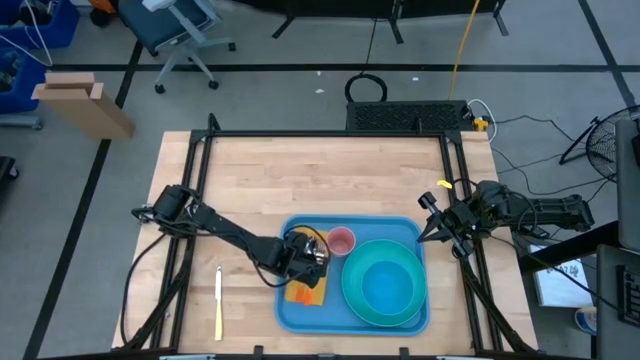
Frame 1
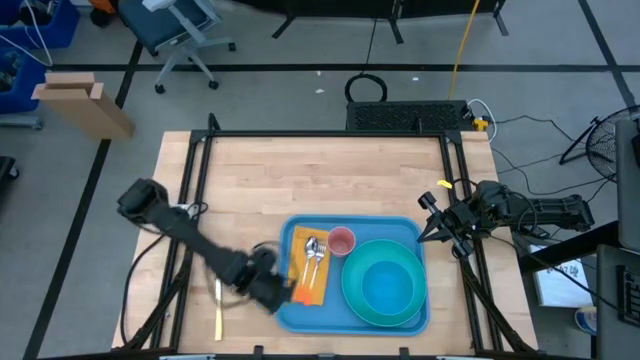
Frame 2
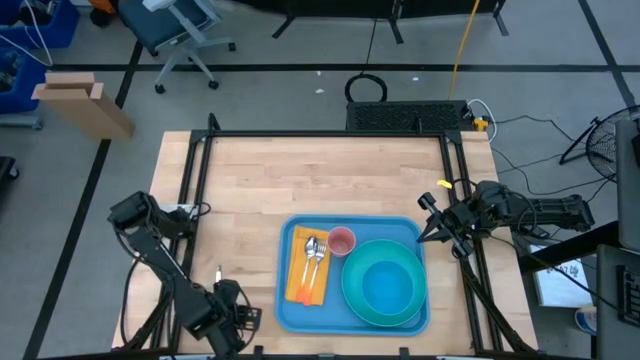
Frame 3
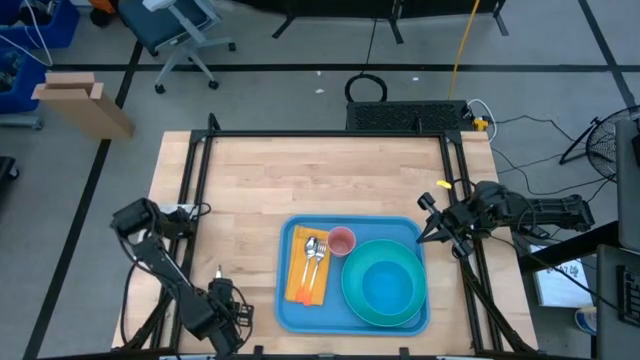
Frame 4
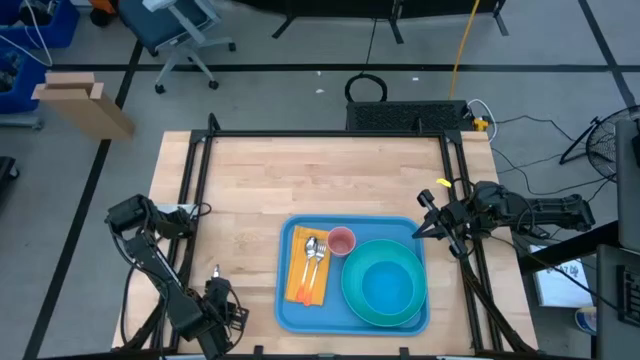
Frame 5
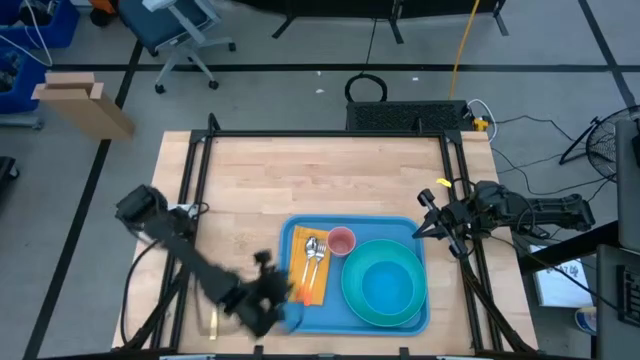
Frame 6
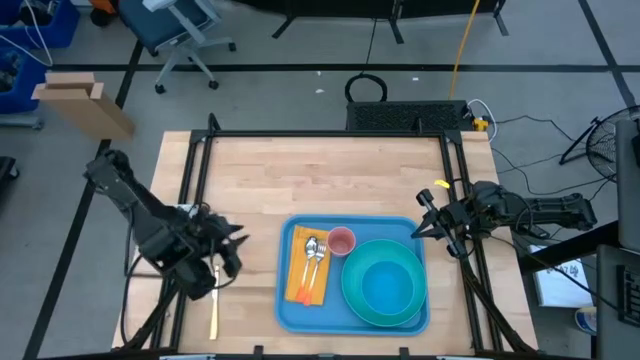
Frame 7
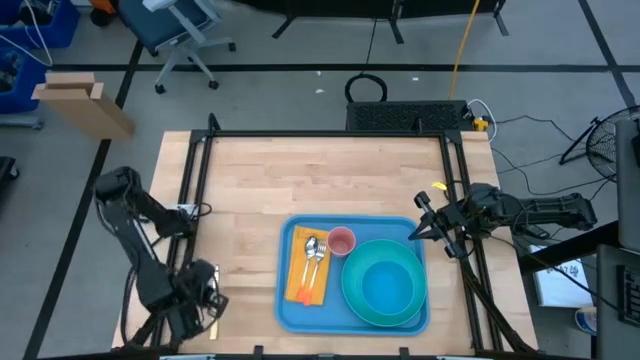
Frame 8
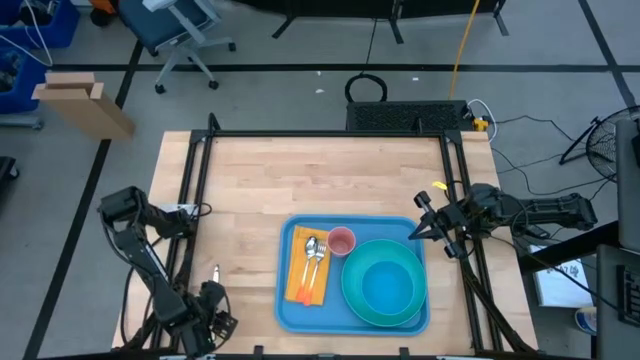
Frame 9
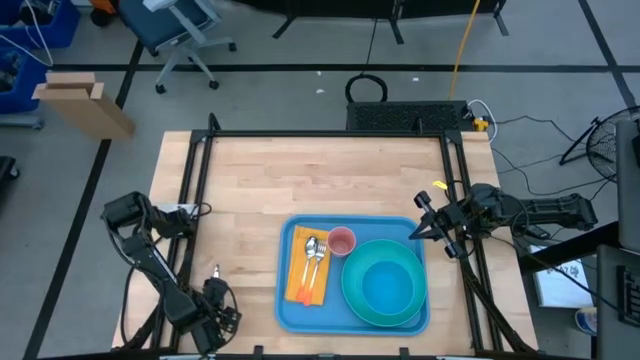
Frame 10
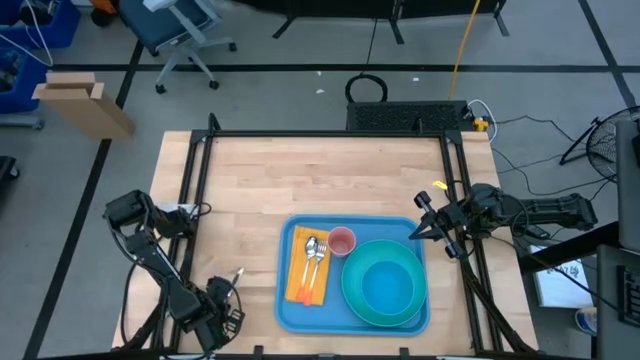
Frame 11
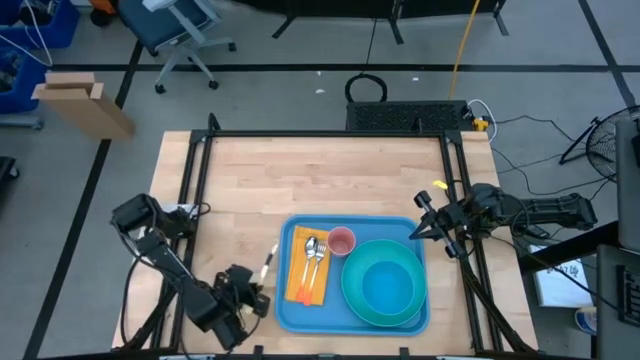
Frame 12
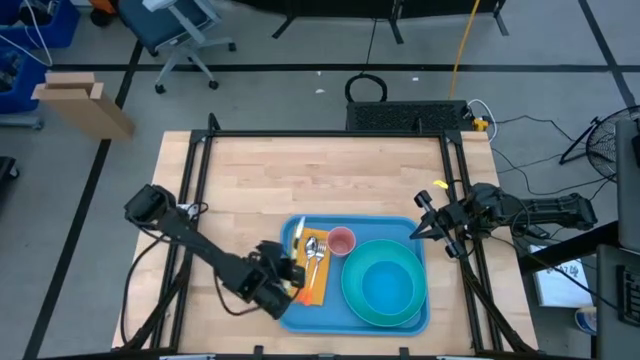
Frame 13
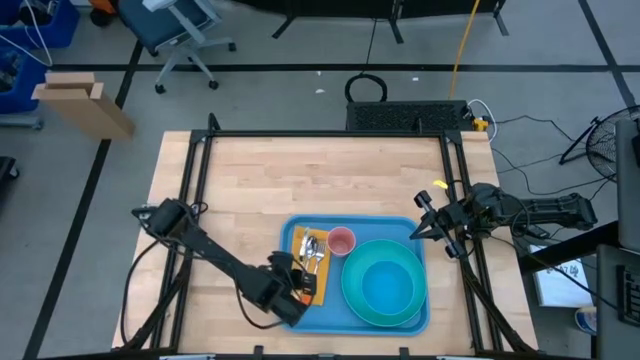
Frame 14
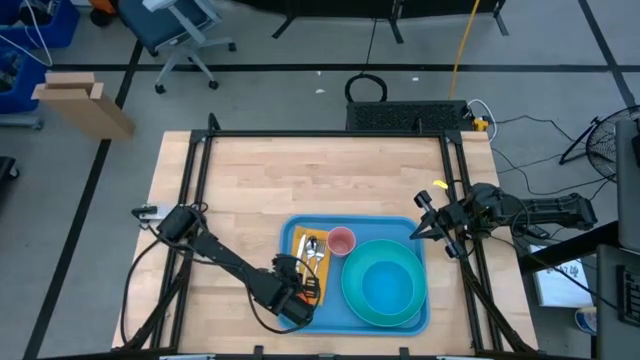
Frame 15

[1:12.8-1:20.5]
Task: Set up tray
Put the yellow knife on the yellow napkin, left of the orange spoon

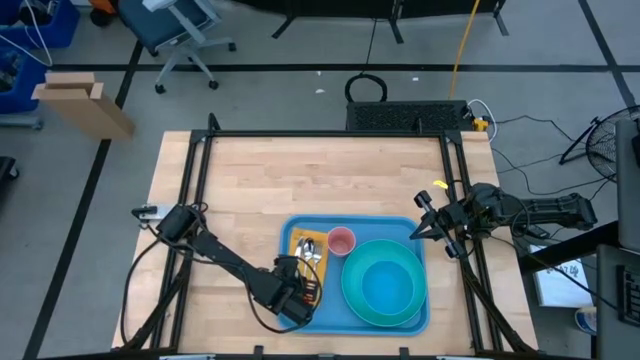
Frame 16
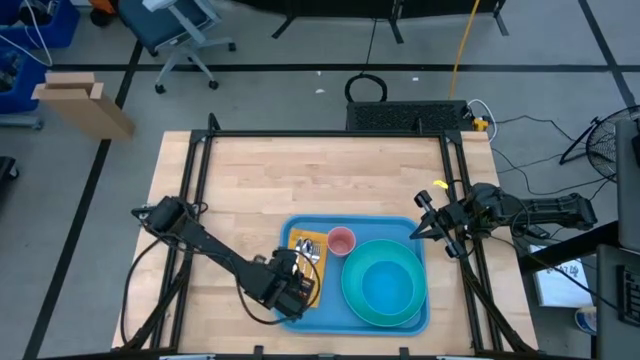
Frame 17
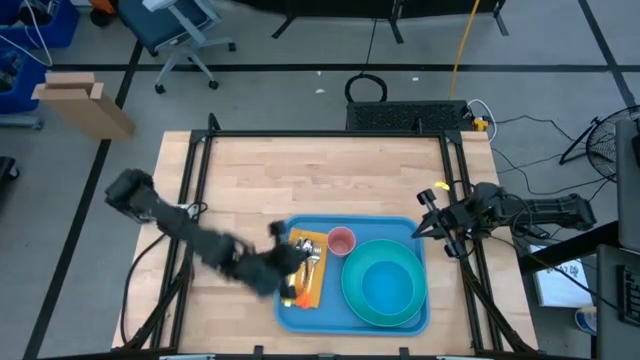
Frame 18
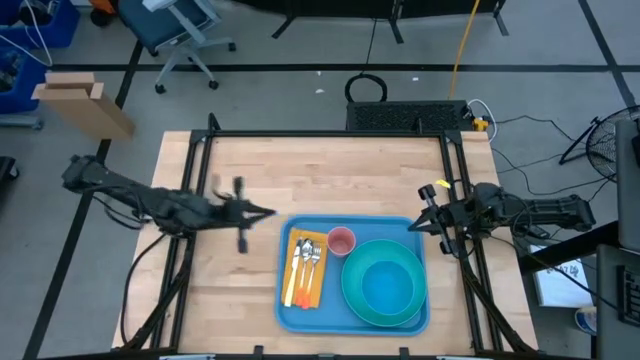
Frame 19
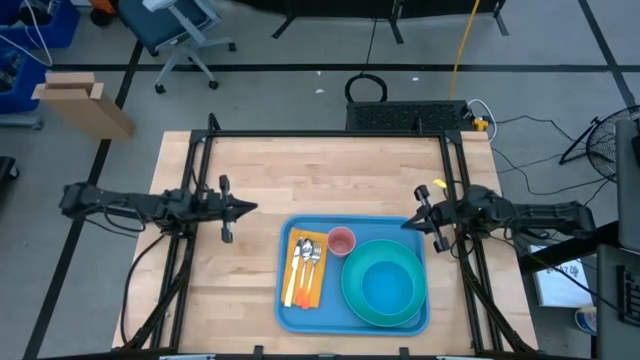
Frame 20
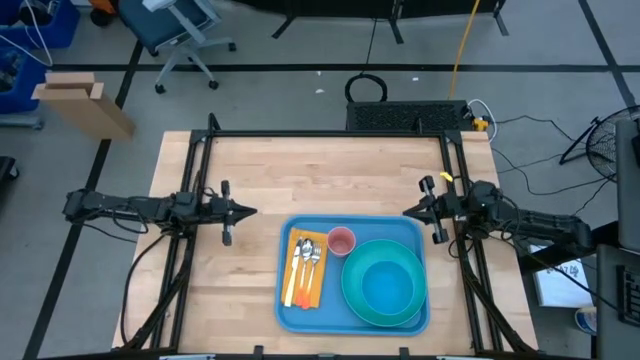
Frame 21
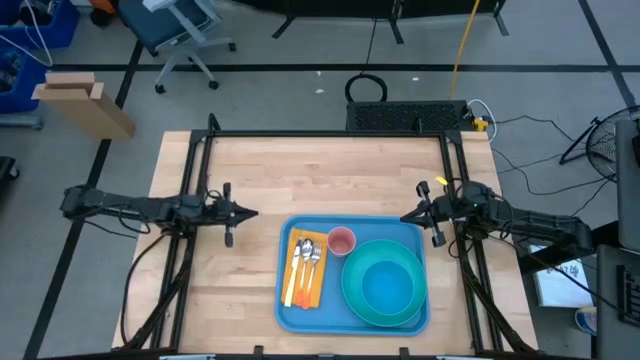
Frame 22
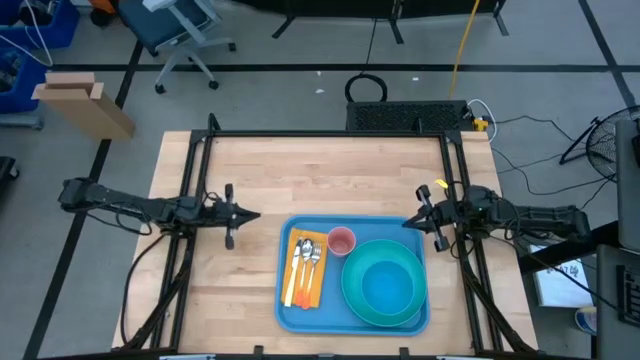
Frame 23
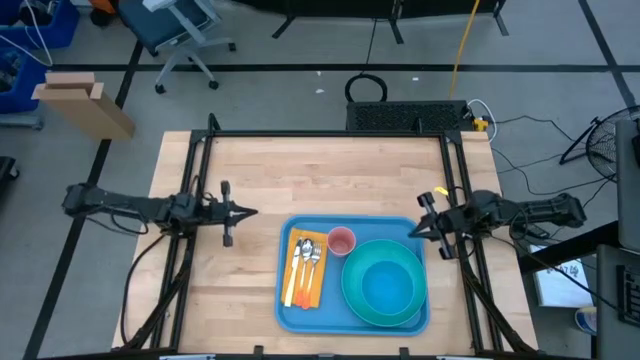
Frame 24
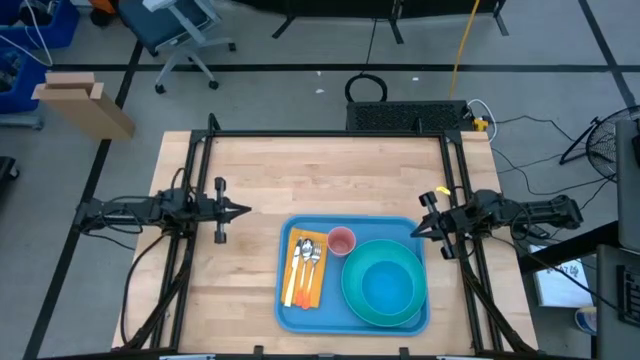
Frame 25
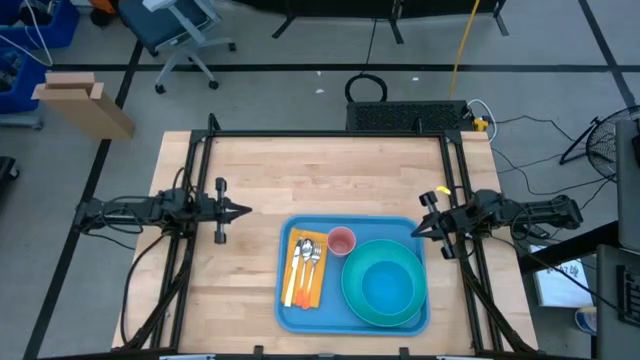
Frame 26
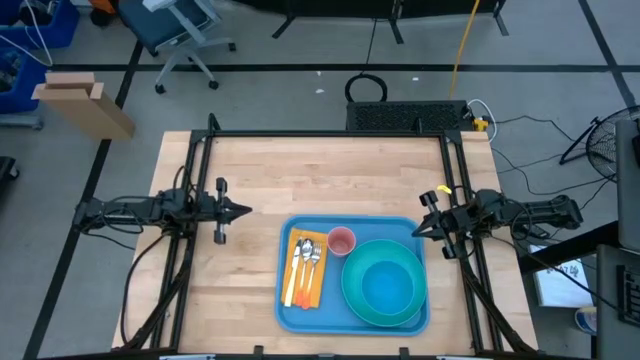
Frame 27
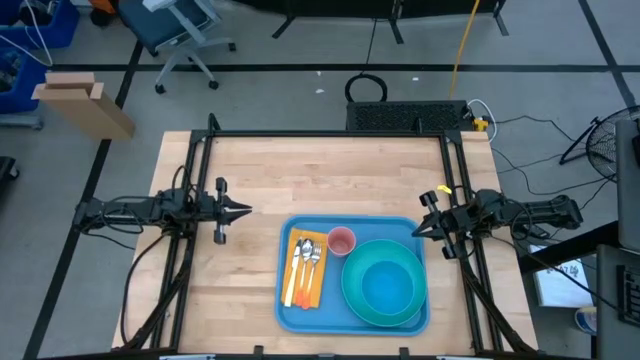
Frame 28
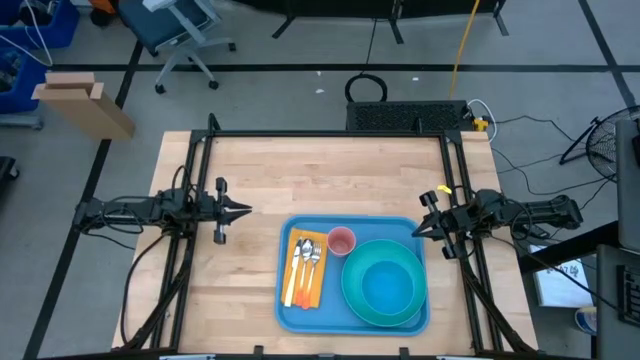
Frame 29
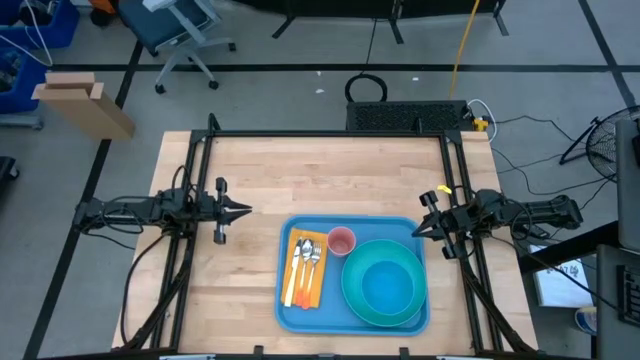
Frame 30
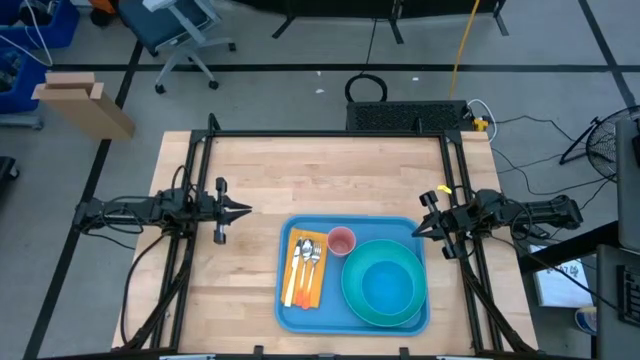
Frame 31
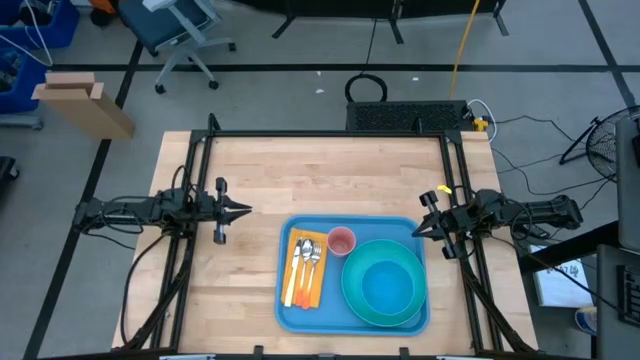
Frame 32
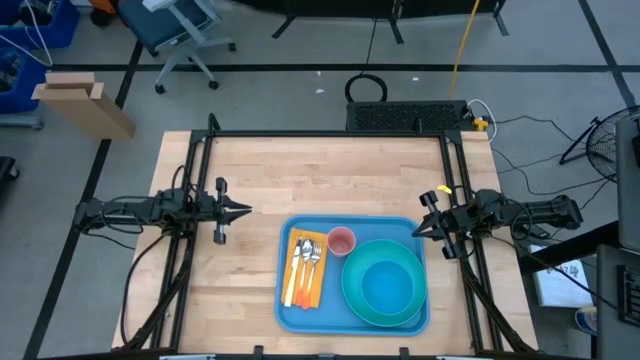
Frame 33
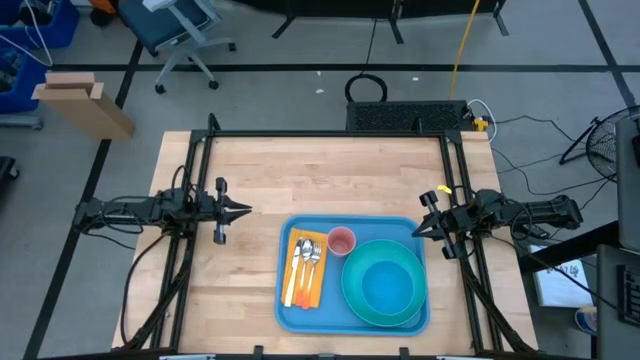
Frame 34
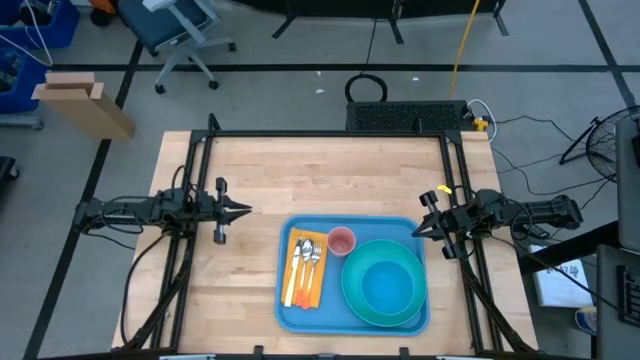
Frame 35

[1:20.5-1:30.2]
Return to Home Position

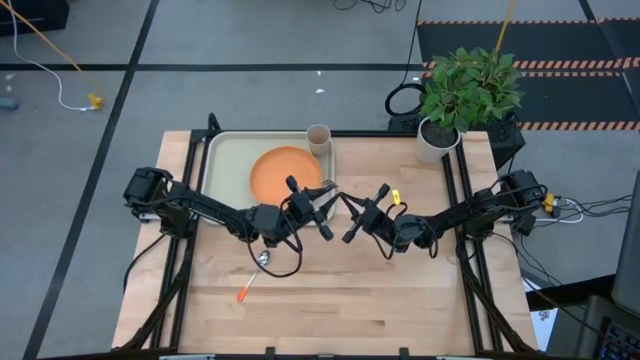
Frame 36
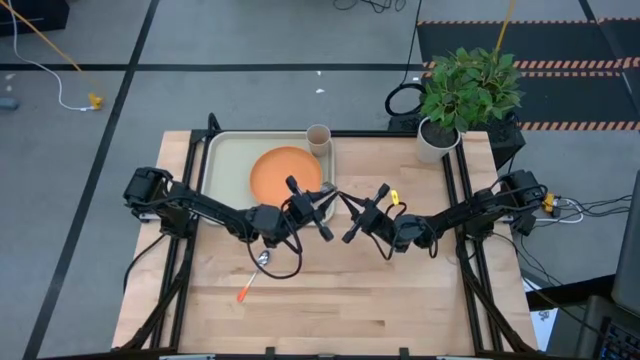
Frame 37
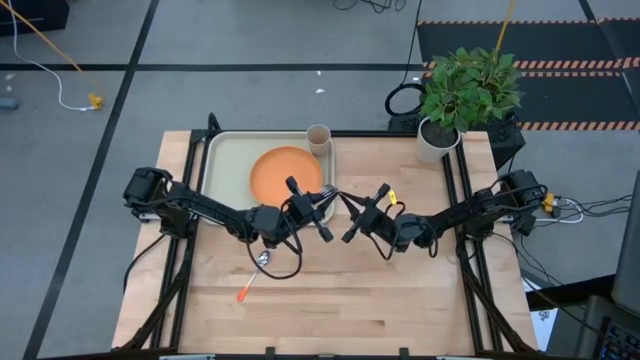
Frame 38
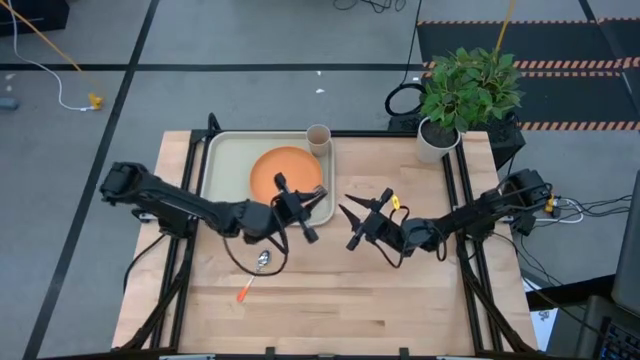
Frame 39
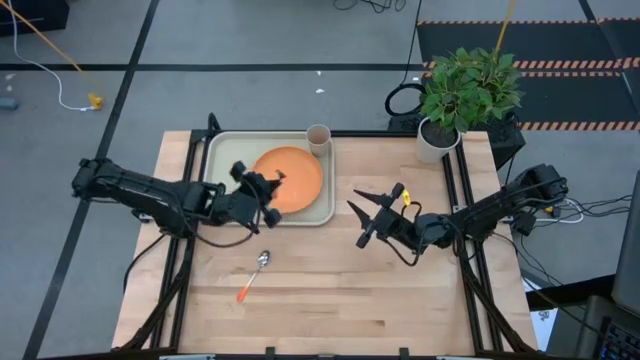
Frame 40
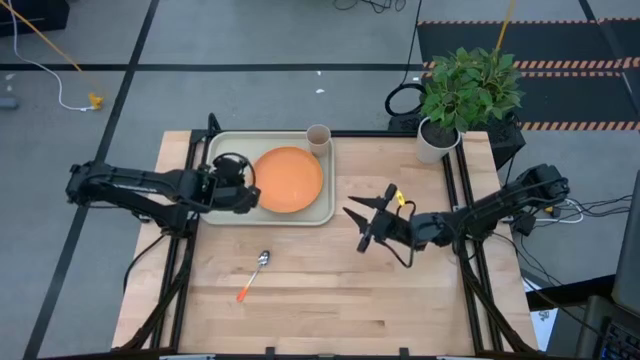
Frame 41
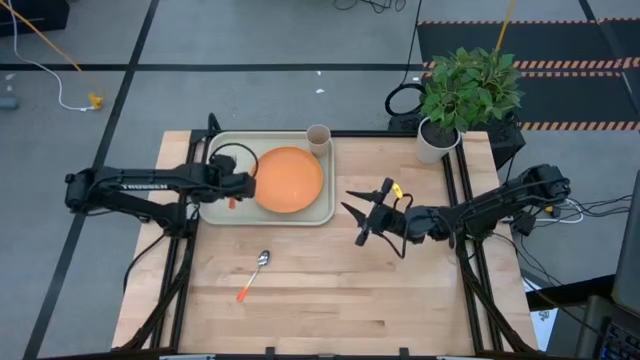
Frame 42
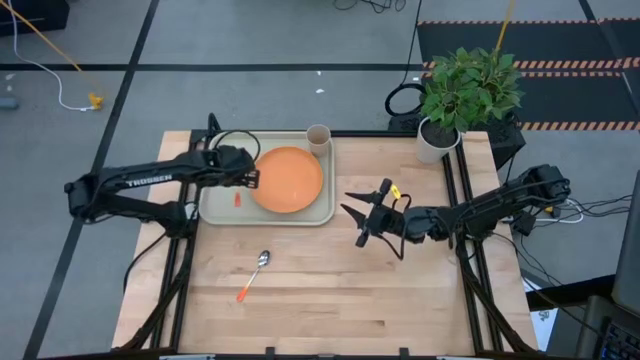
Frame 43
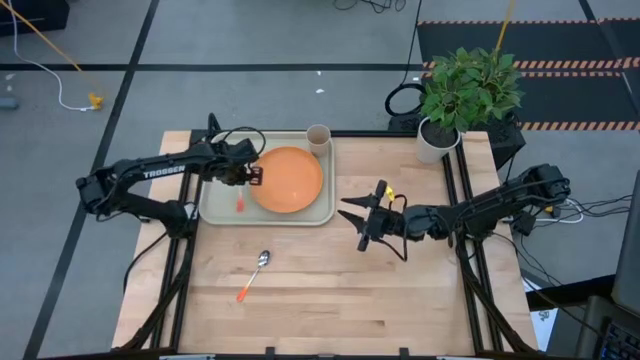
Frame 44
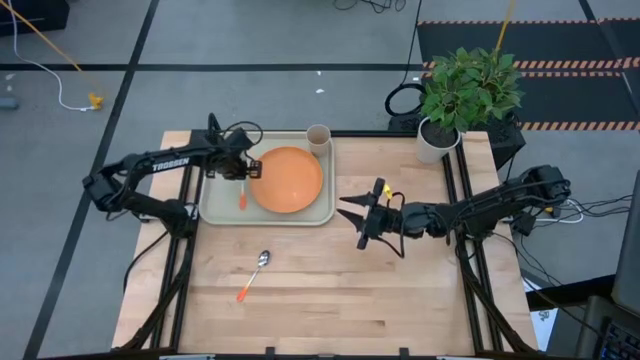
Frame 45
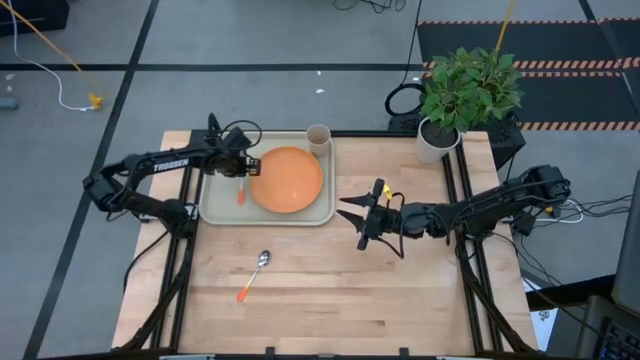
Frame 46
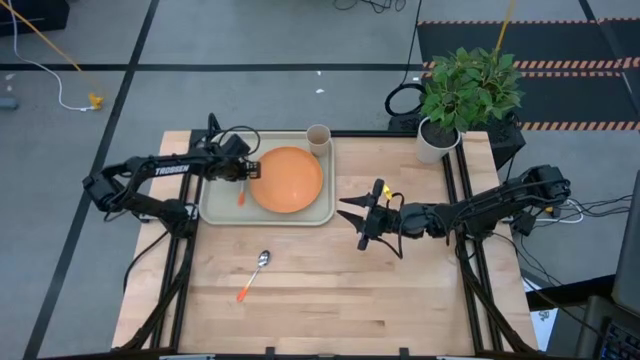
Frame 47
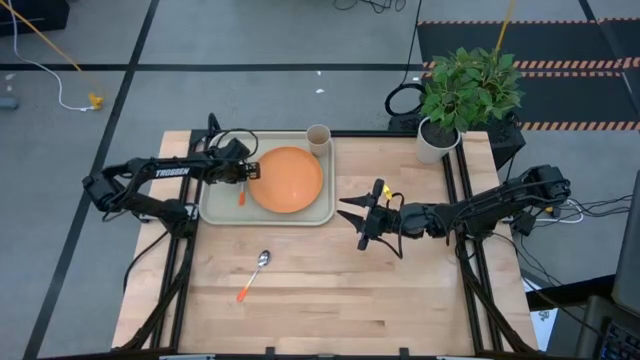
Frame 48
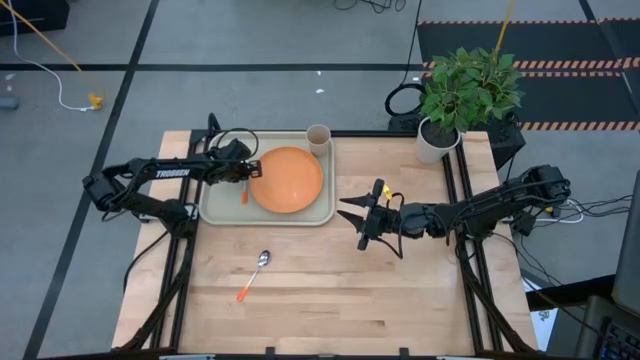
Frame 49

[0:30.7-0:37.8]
Task: Pick and place plate/cup/fork/spoon on tray
Put the orange fork on the white serving tray to the left side of the orange plate
